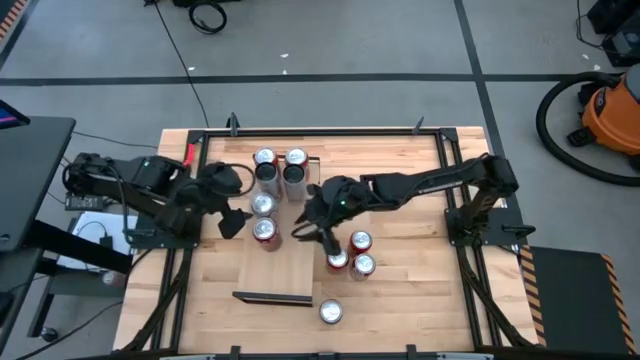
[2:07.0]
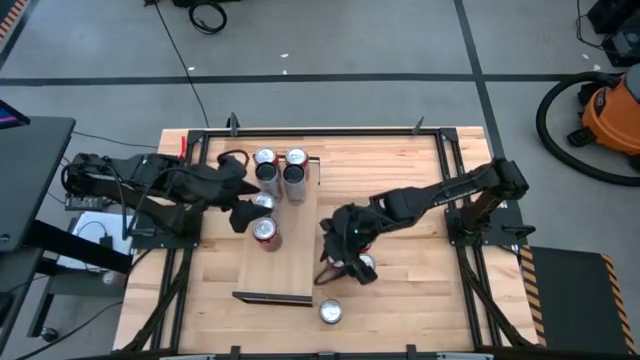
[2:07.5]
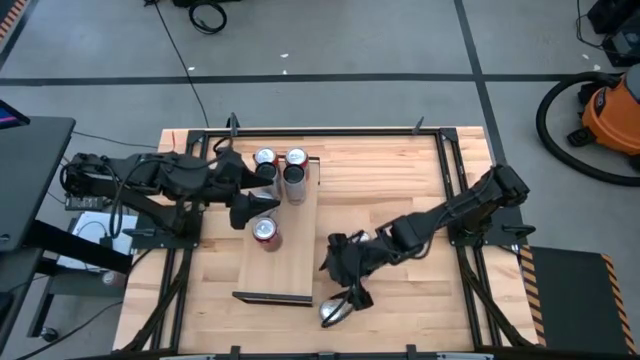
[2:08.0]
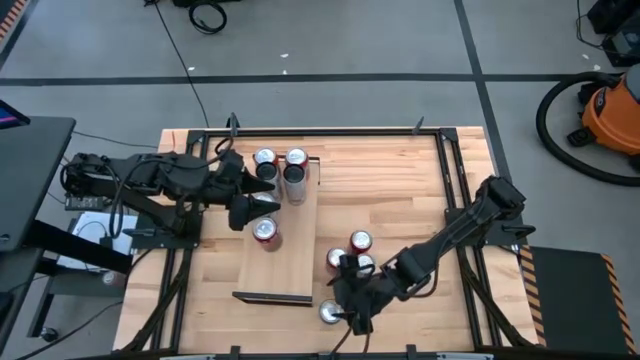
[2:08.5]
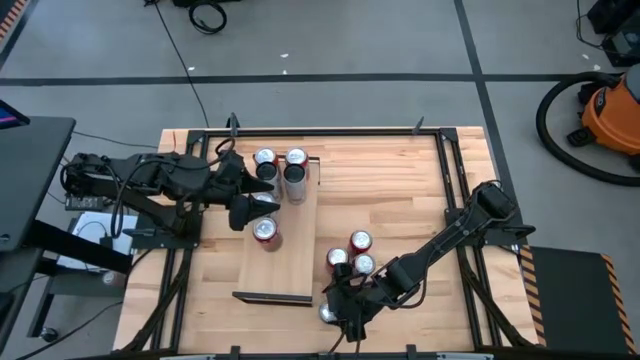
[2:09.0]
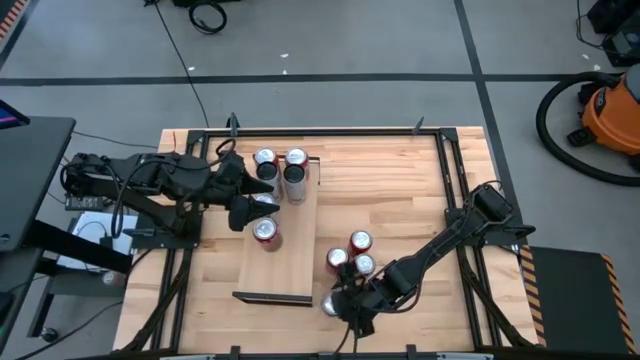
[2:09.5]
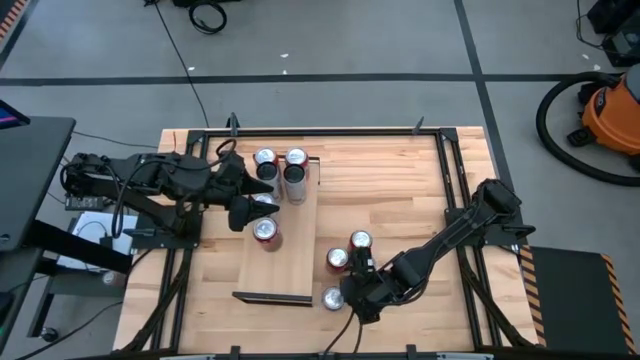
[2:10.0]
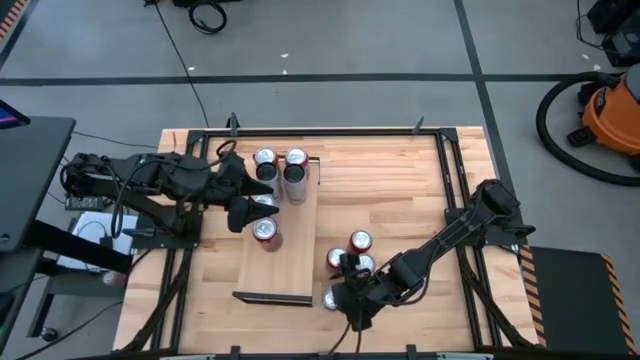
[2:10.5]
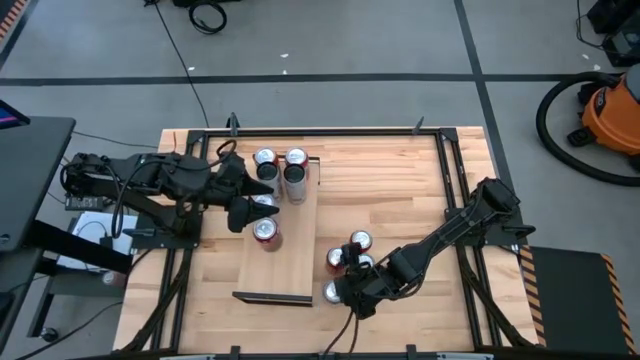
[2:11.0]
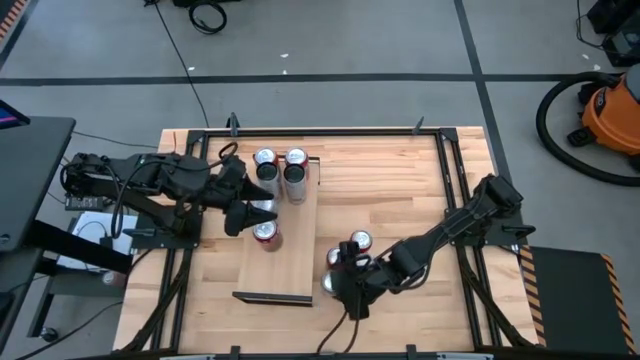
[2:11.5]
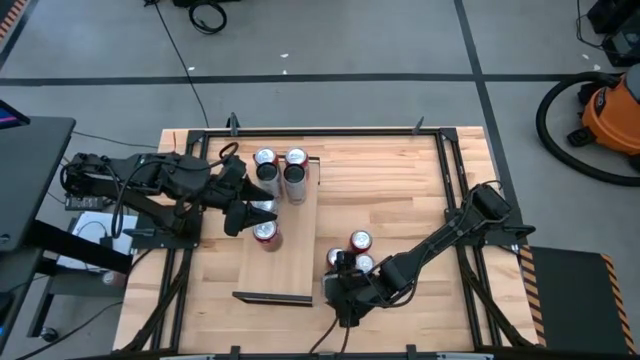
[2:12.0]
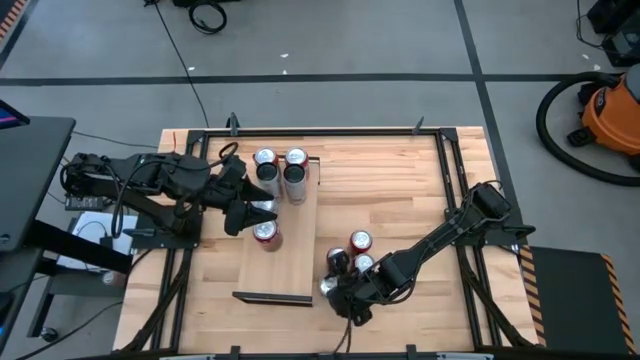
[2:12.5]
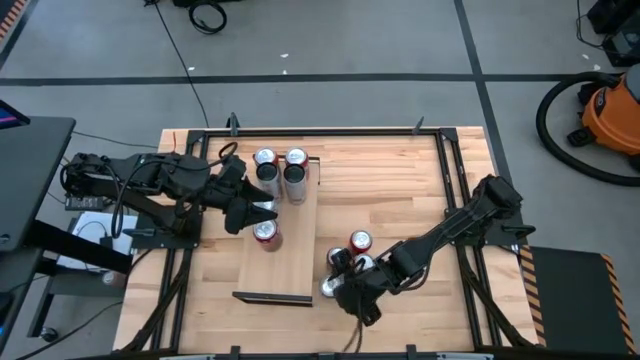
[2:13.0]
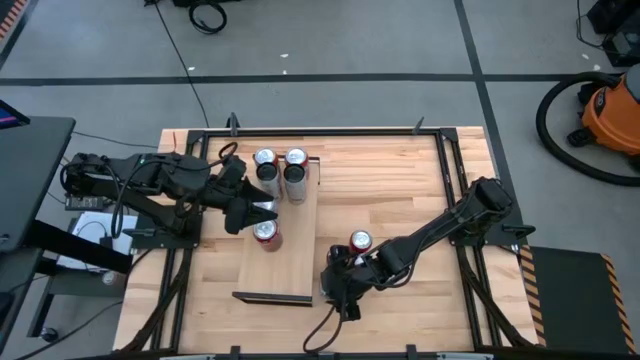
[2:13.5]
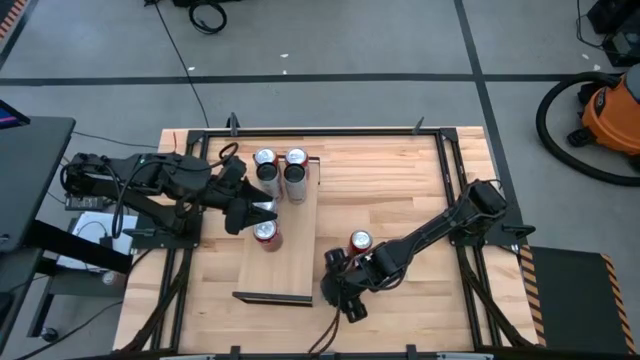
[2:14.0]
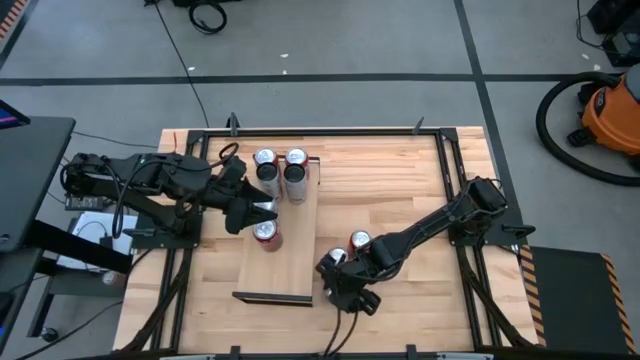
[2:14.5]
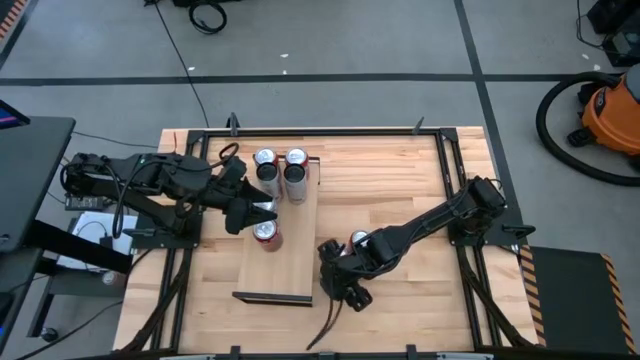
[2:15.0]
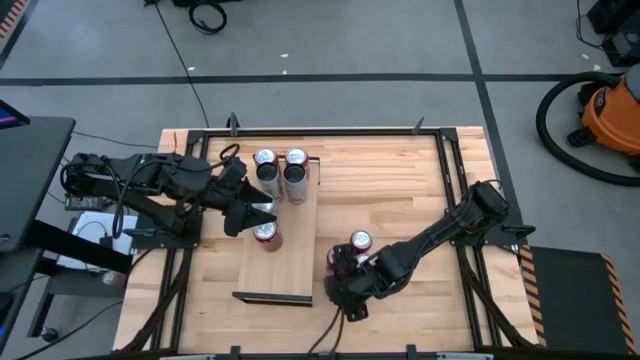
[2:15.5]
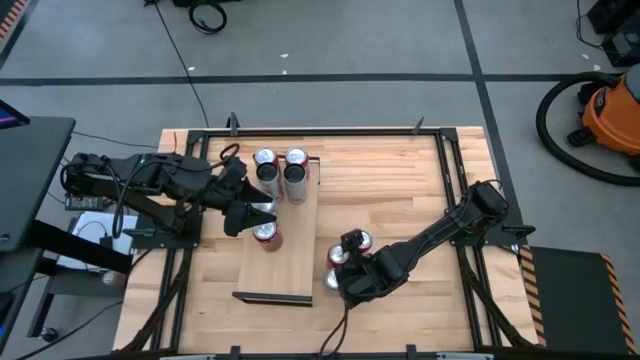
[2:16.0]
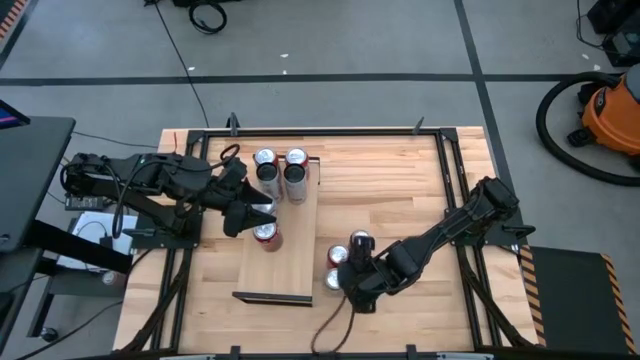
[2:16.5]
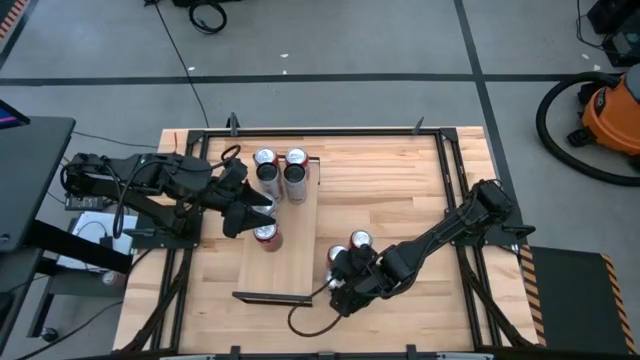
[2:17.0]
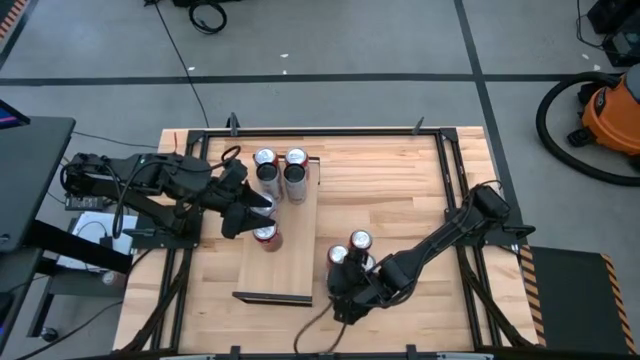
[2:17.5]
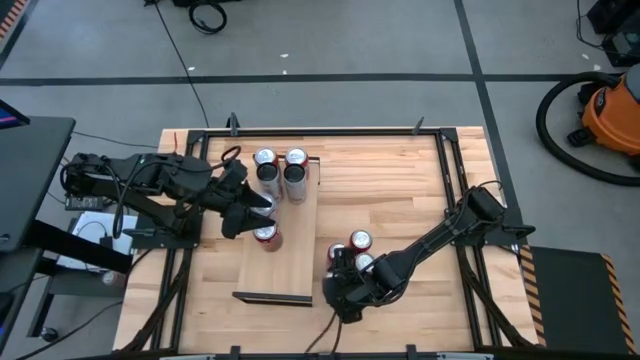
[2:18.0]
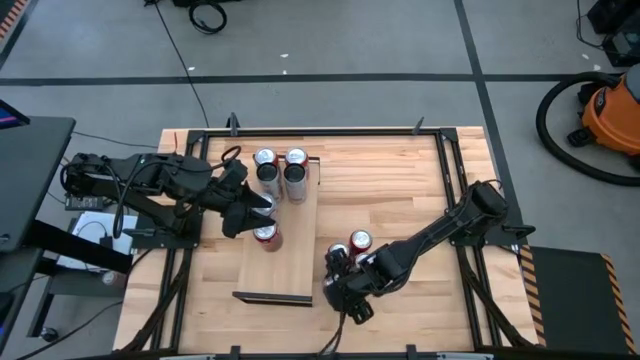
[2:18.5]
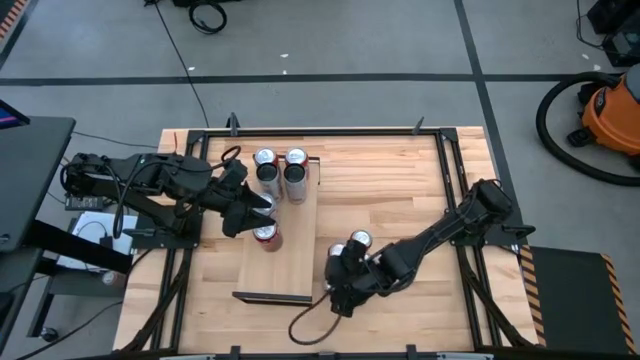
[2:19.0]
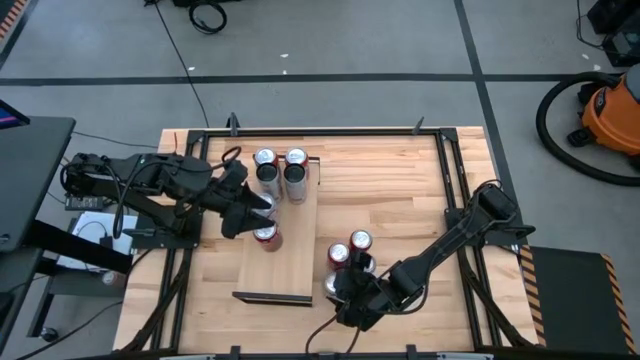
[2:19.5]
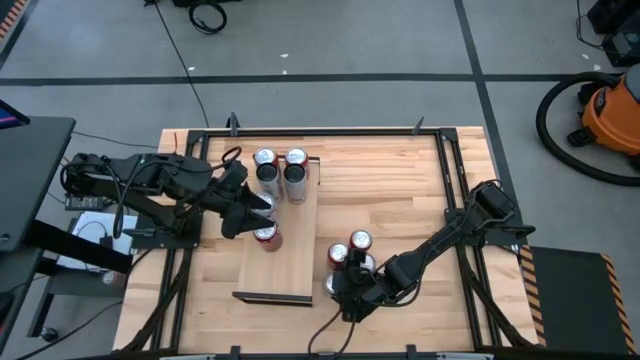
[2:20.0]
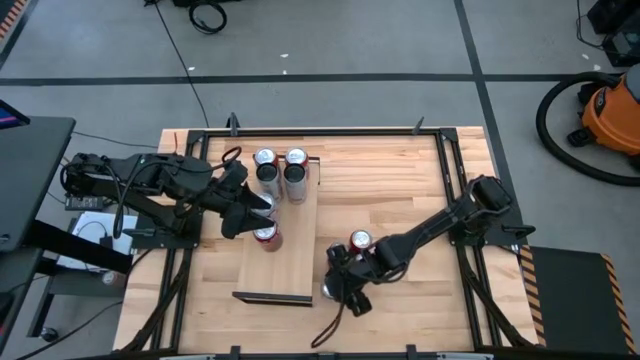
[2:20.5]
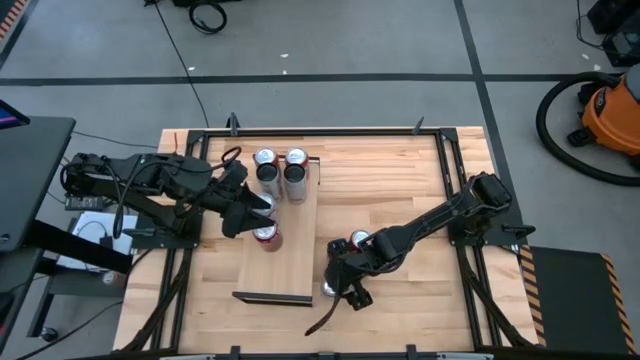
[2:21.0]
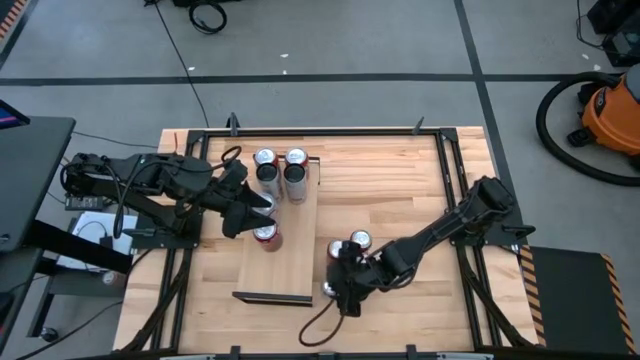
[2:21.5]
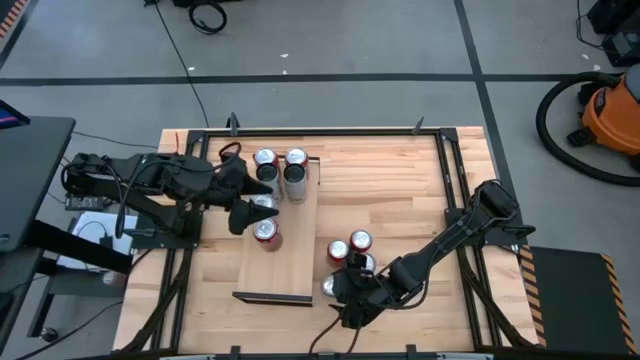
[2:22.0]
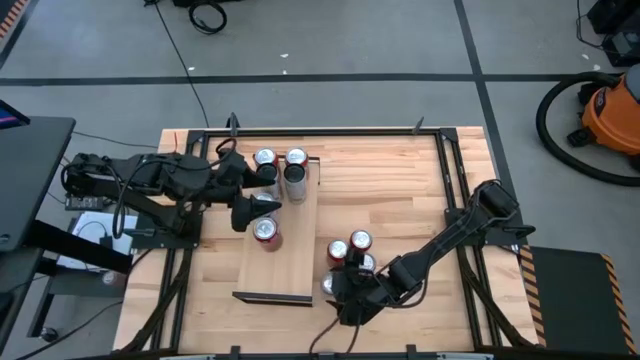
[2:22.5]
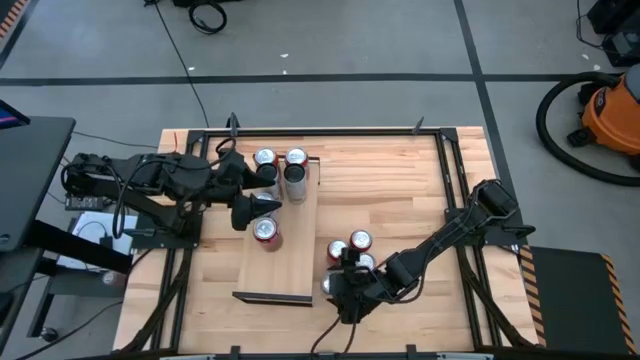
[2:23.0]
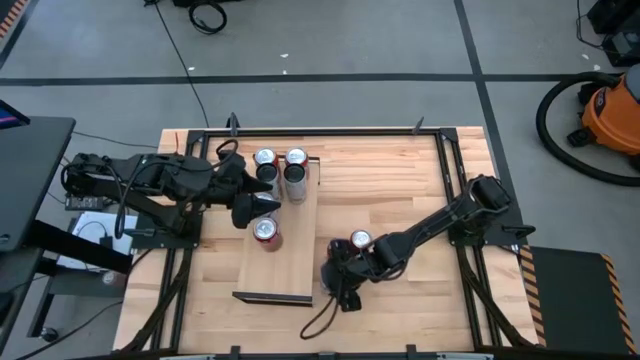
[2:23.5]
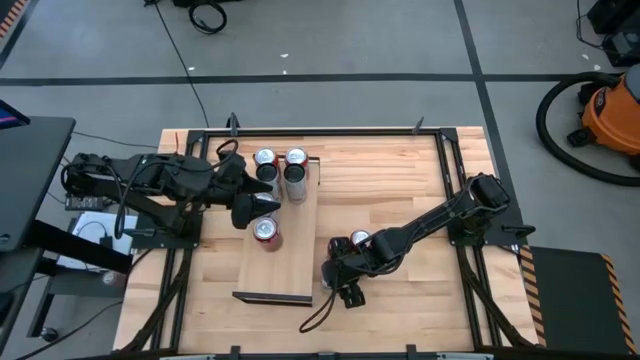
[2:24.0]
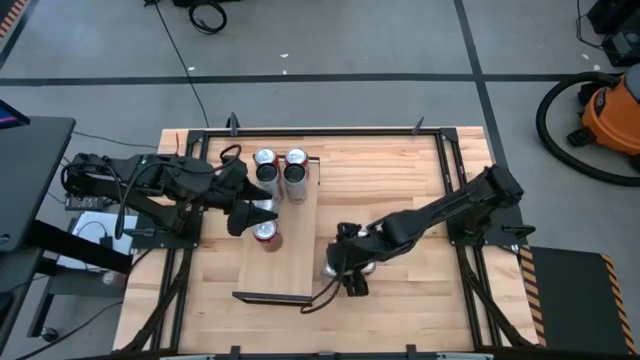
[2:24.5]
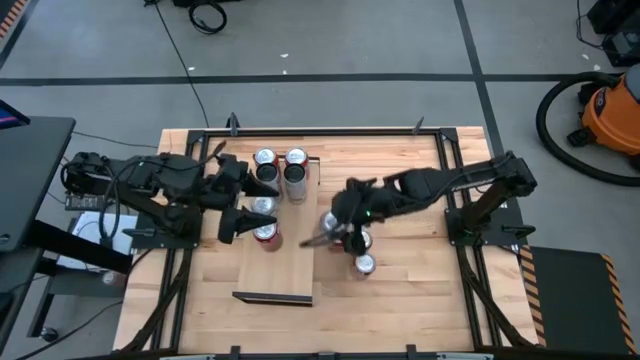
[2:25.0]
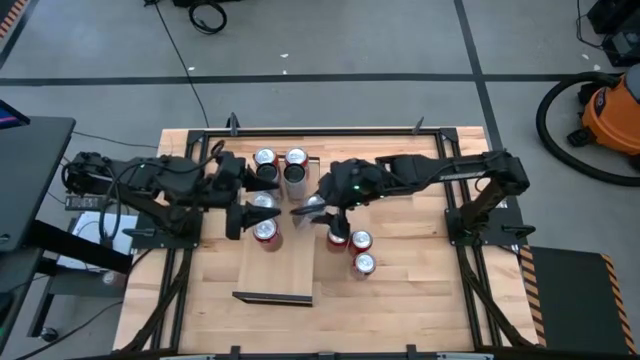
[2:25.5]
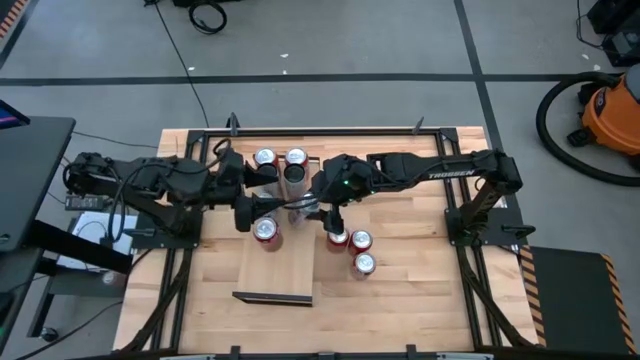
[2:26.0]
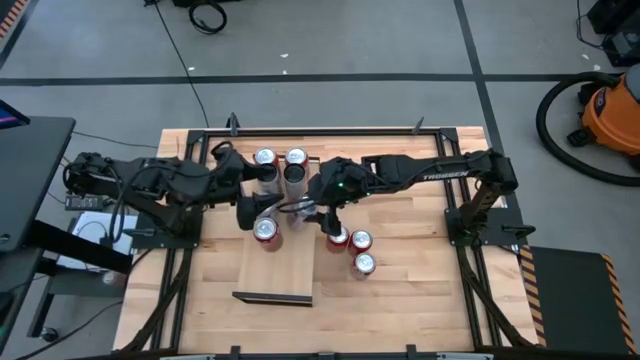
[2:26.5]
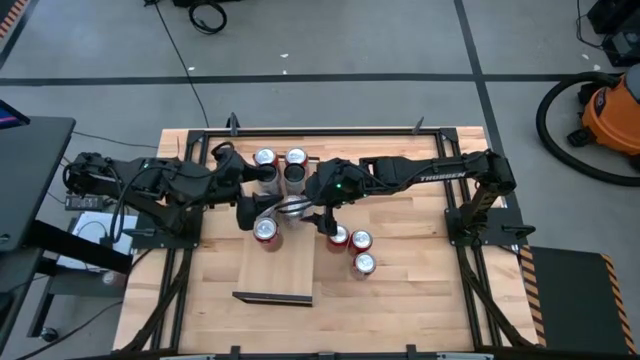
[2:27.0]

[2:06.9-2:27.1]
Task: Place canned beverage on shelf
Put the red and silver soda can aligned with the other red and silver soda can on the shelf

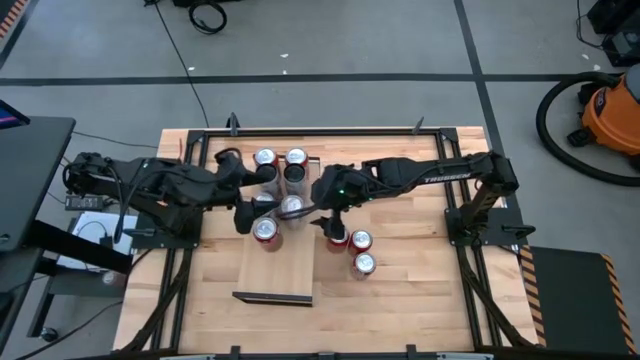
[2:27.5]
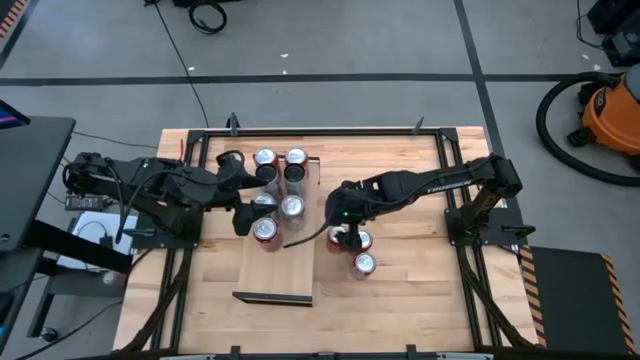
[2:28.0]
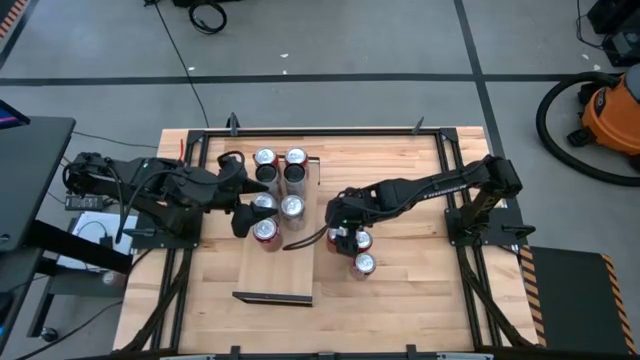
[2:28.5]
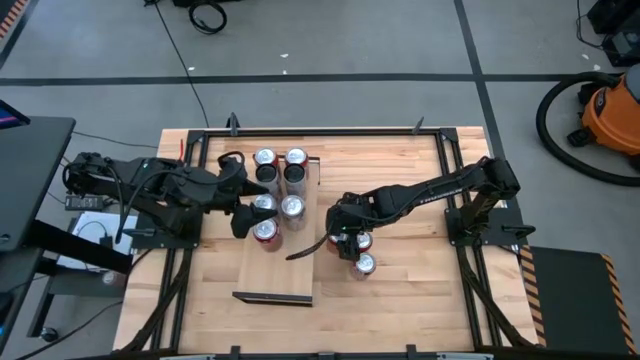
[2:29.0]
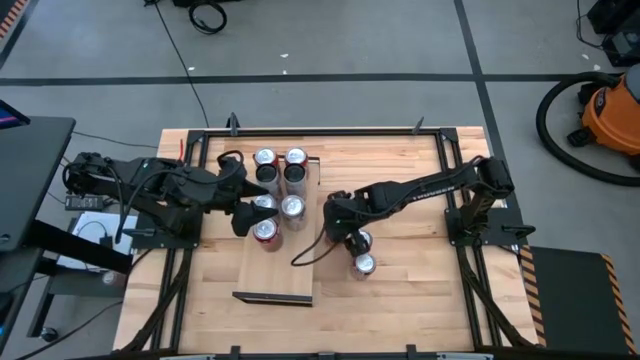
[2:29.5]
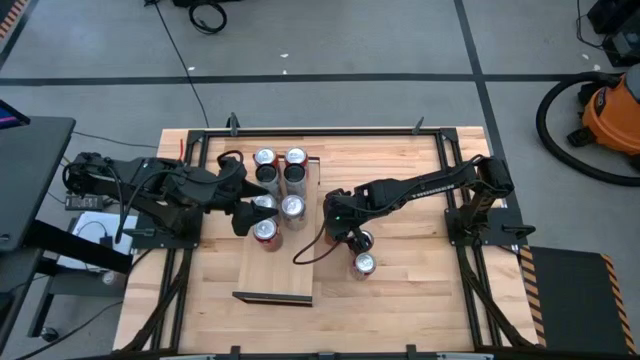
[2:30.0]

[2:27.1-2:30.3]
Adjust the top left red and black soda can
